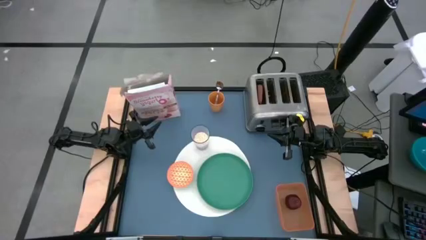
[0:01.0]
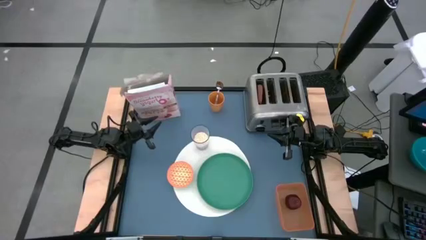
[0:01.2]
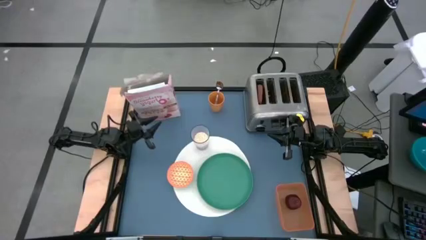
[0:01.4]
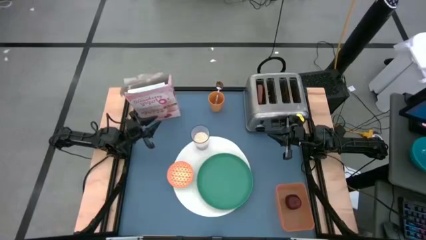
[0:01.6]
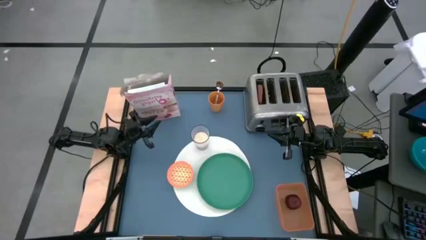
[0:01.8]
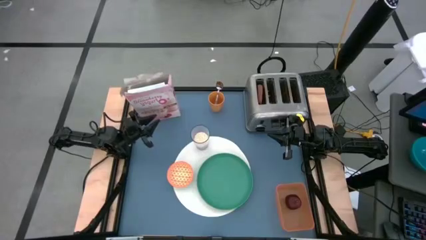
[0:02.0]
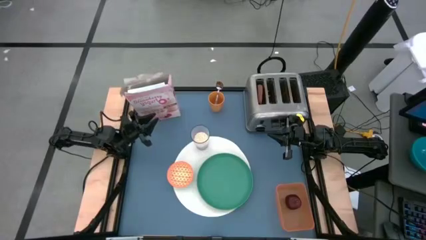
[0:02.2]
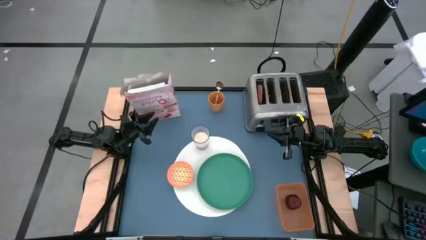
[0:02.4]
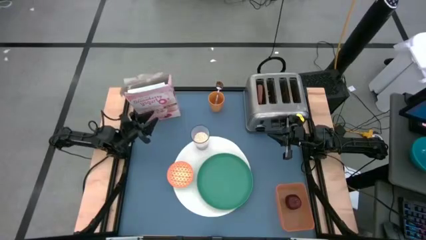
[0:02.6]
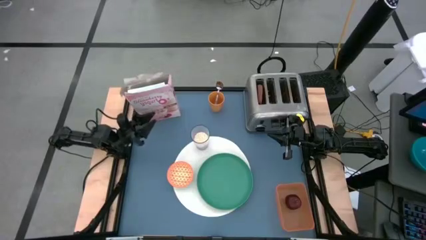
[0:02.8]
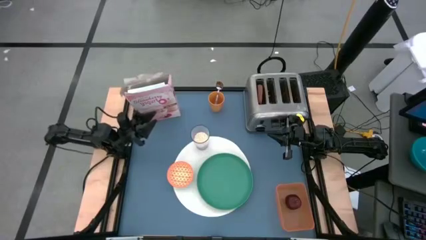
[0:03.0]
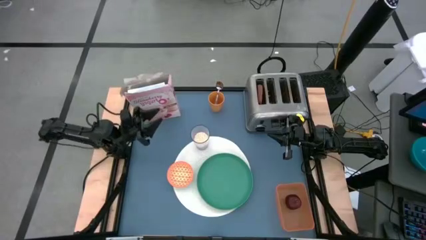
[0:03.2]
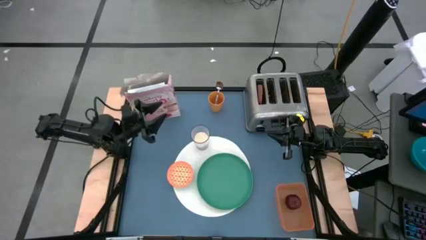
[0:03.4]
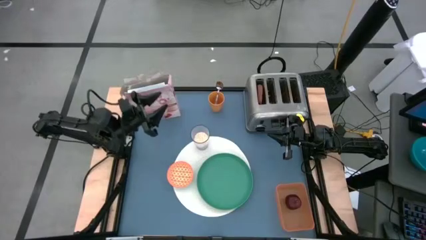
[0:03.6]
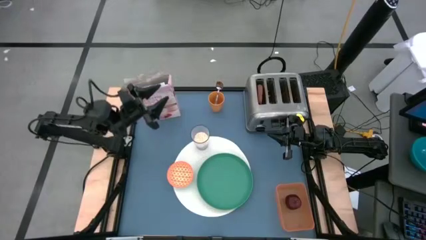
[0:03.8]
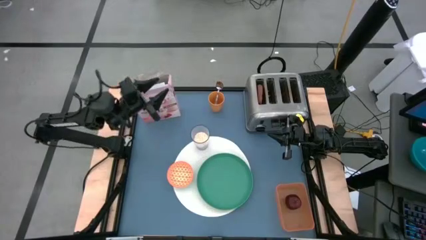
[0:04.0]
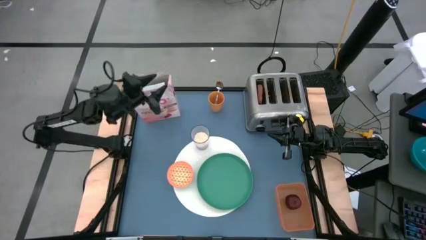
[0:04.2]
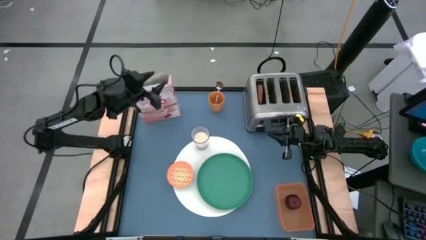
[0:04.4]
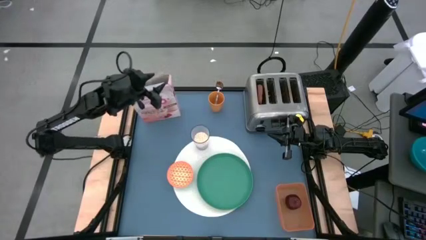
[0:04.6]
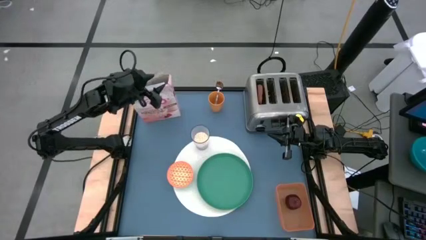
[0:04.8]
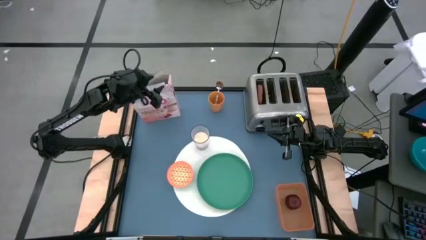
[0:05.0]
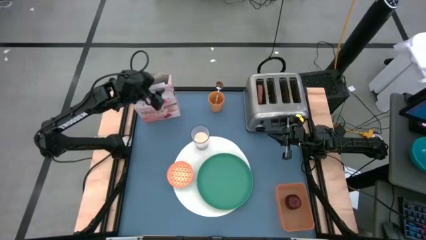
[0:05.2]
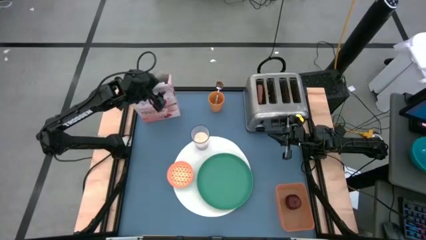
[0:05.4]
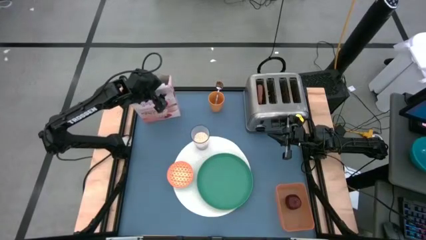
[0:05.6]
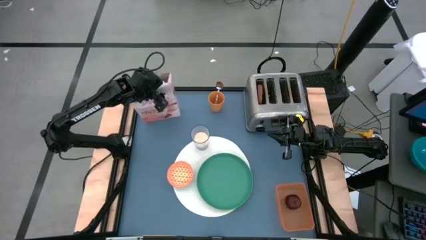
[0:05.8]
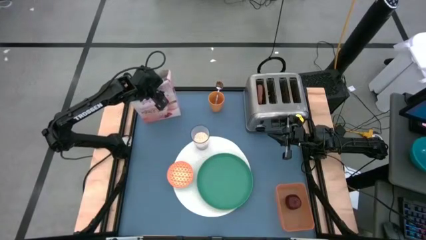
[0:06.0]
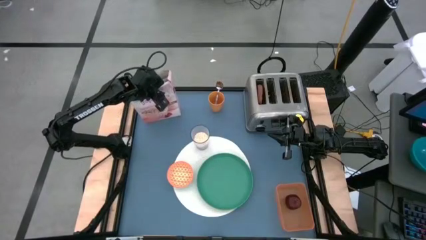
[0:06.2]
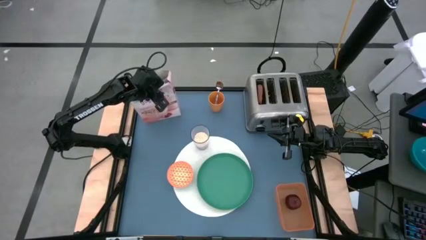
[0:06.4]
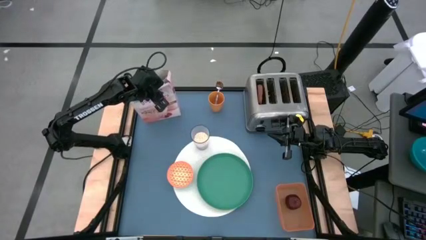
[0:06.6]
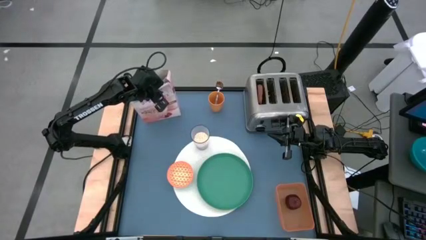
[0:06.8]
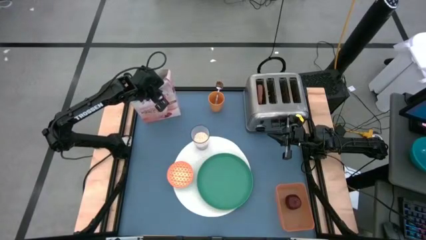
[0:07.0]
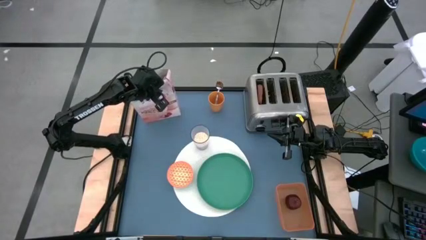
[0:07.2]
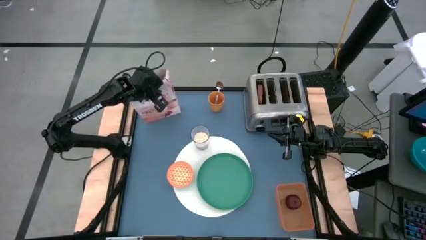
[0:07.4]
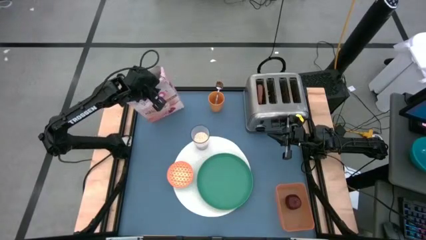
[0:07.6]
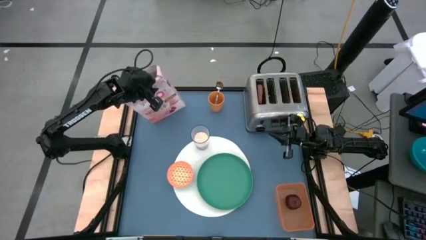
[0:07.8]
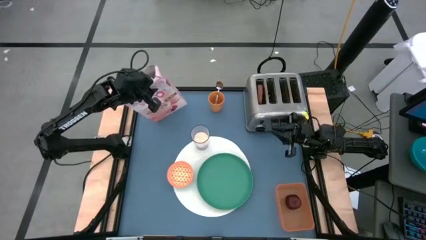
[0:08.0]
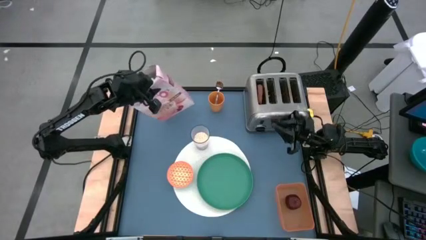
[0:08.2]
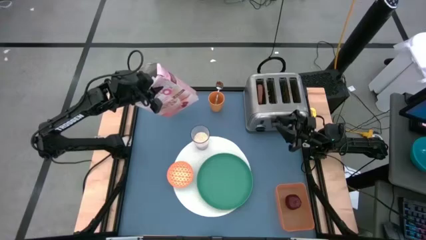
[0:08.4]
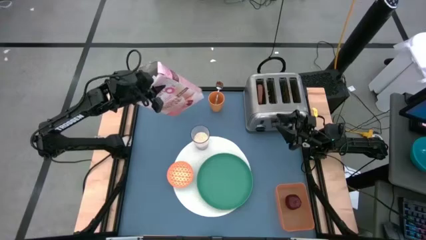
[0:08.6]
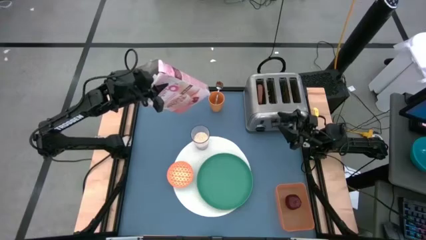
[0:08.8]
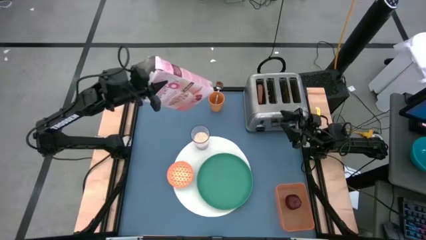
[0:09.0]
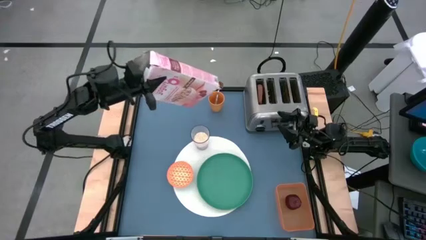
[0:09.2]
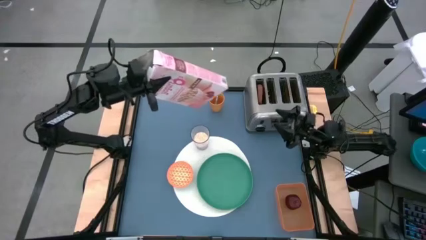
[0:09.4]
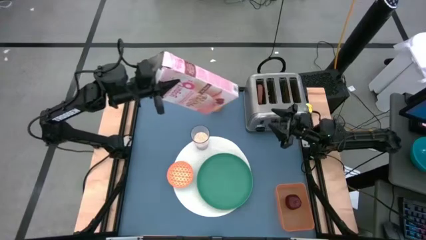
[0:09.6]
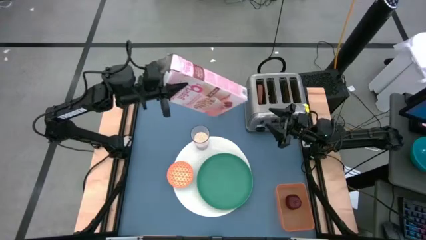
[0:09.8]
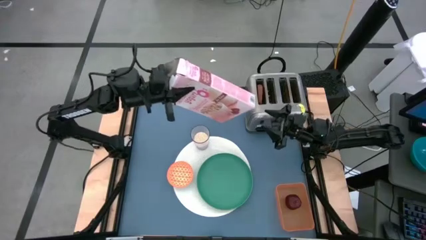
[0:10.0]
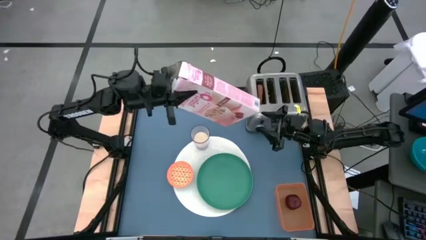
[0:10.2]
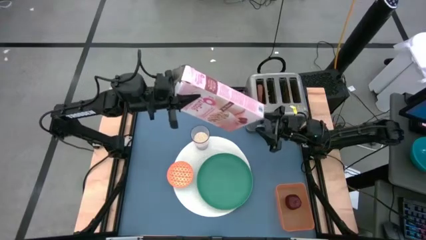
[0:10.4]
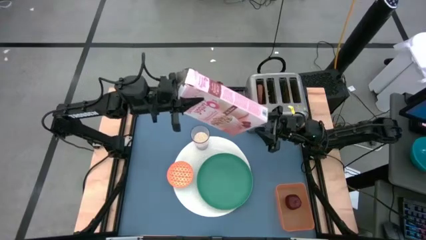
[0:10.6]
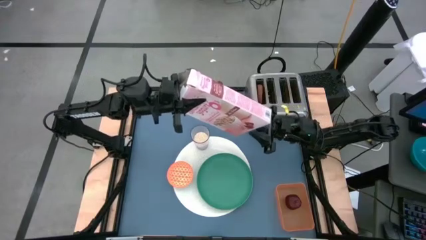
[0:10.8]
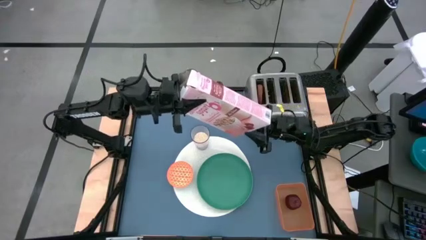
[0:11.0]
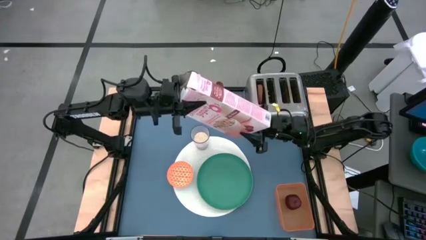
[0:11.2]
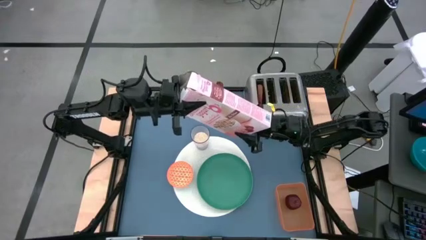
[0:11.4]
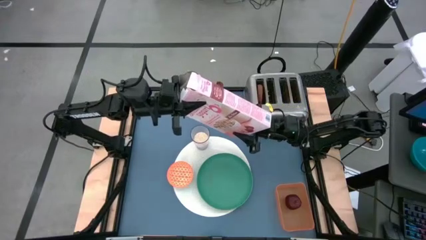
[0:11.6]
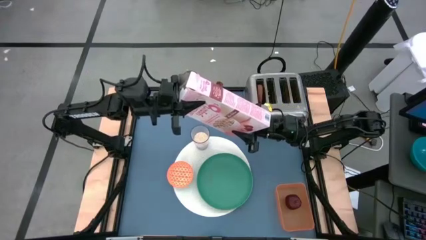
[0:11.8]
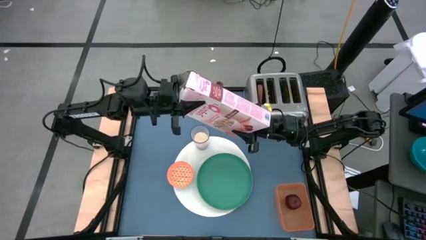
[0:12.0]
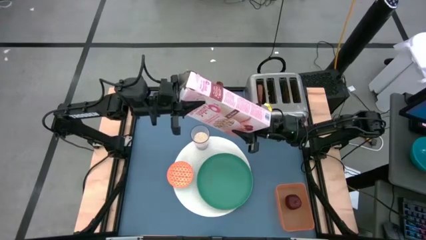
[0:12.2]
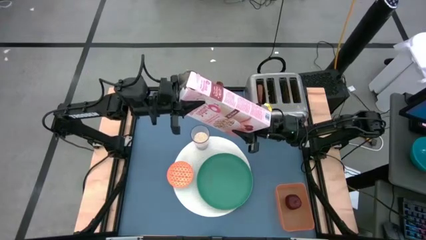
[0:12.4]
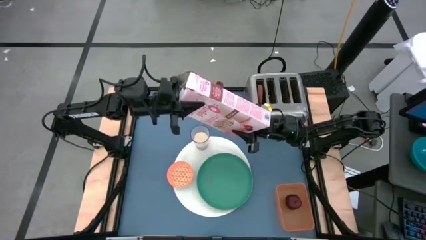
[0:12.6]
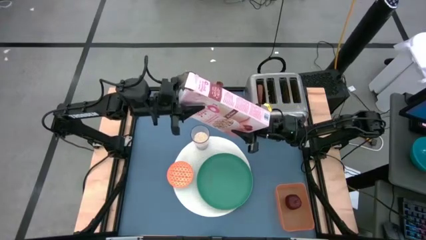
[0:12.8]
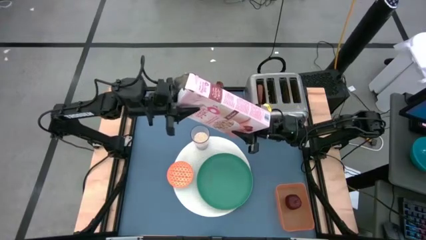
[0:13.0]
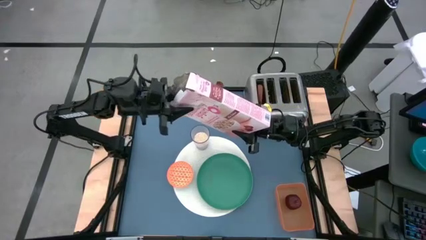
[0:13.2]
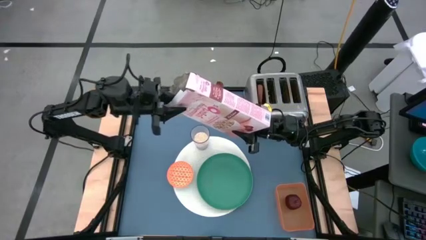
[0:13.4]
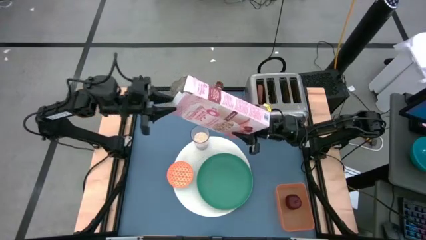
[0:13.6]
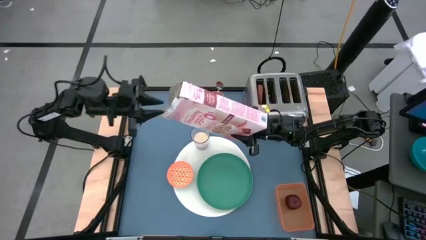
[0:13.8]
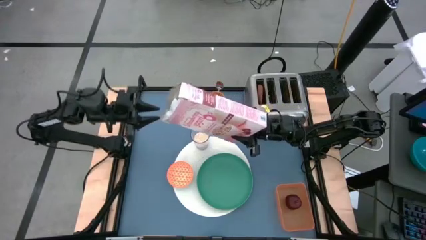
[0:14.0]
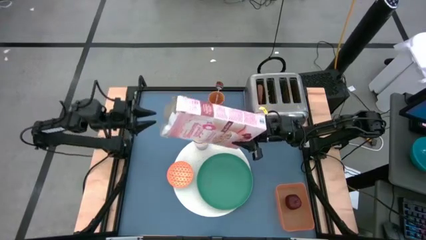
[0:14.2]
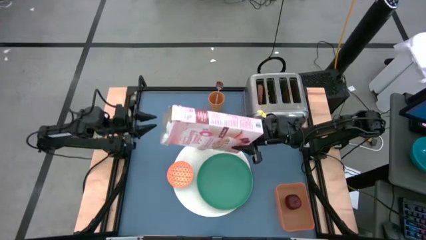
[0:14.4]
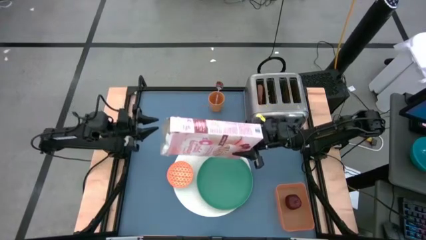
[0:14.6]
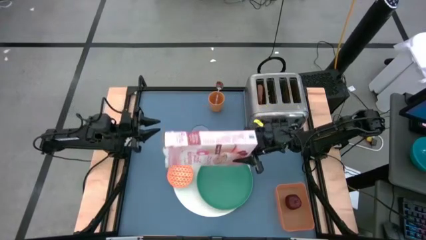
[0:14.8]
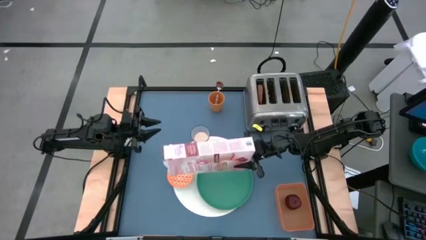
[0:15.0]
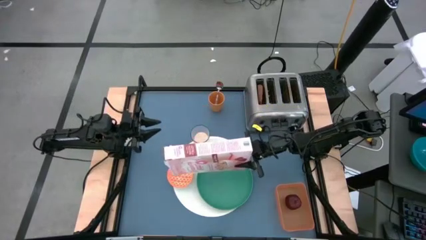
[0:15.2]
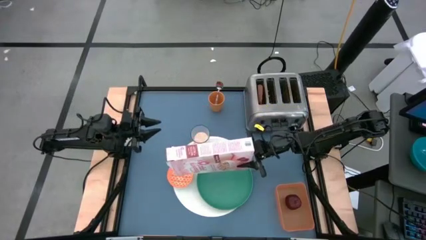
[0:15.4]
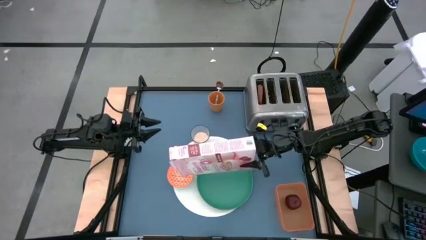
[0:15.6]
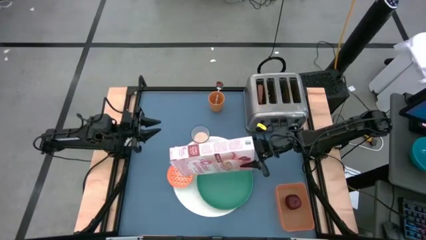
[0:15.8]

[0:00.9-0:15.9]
Task: Arrange a breakfast setting
Pour the cereal from the cereal box into the orange bowl
